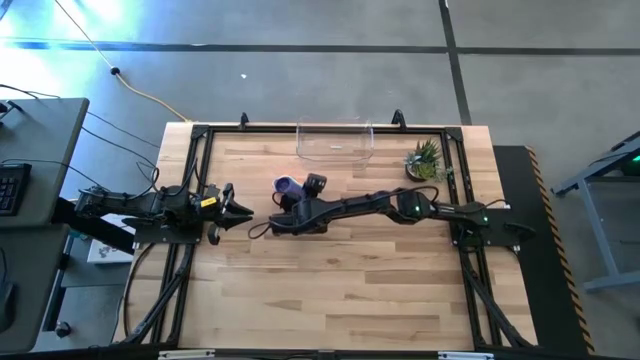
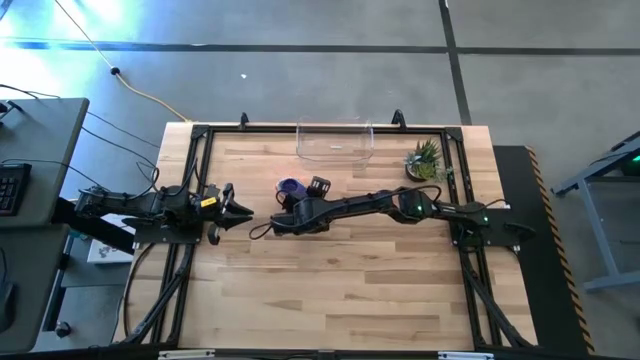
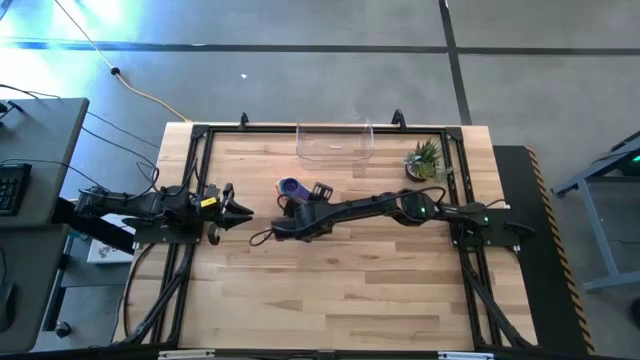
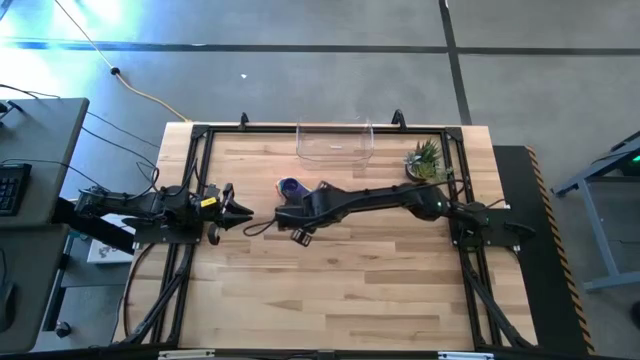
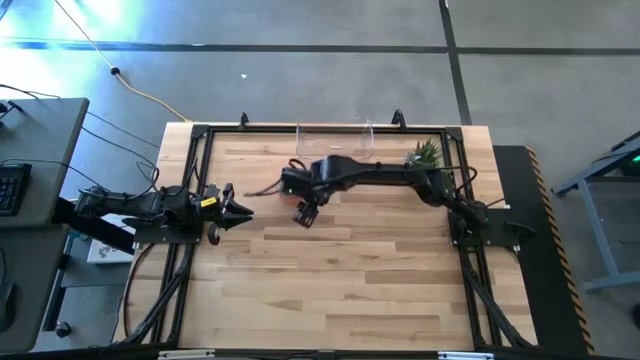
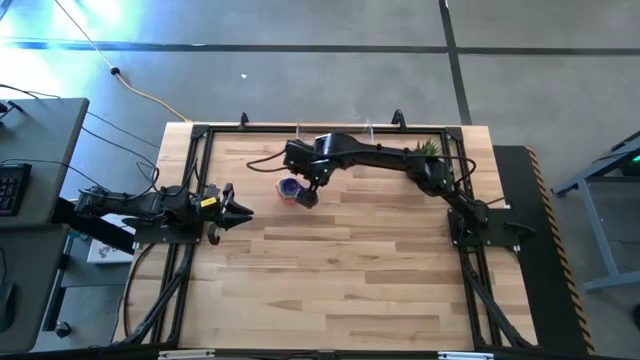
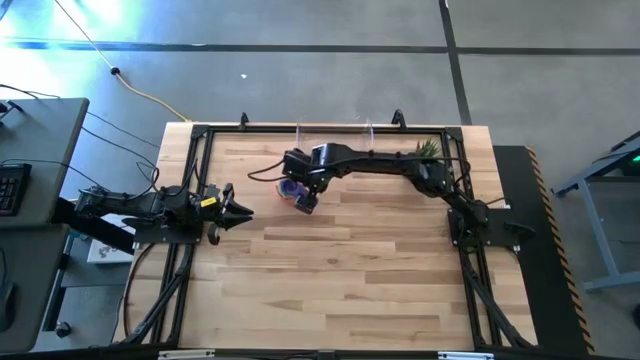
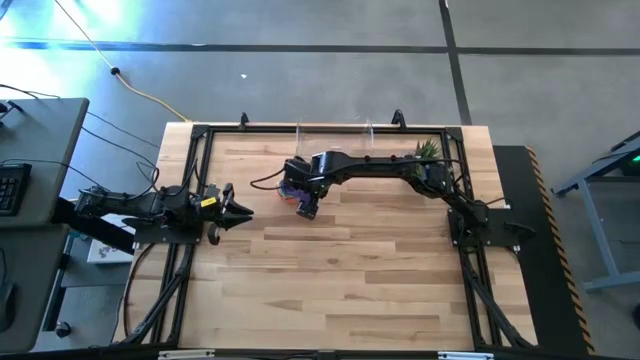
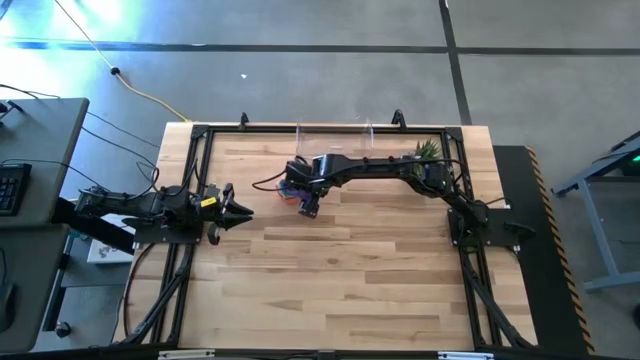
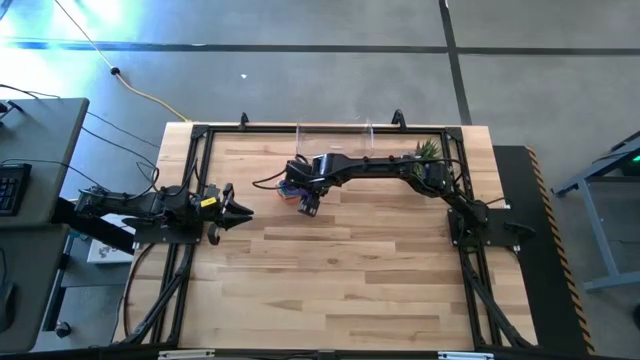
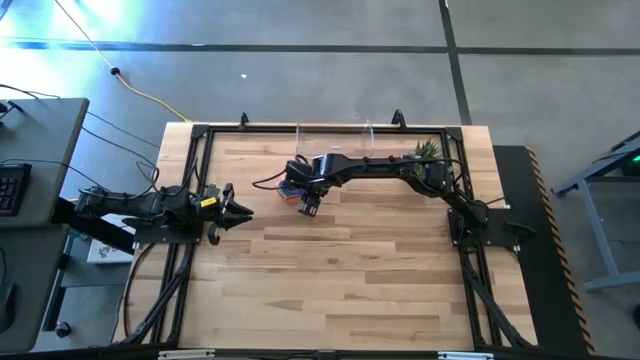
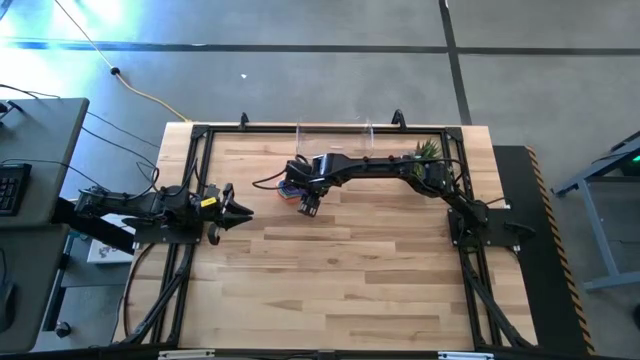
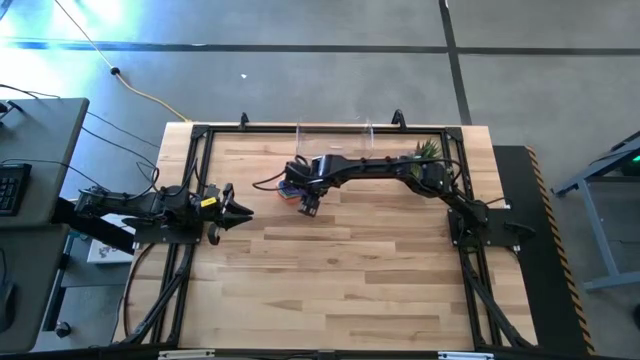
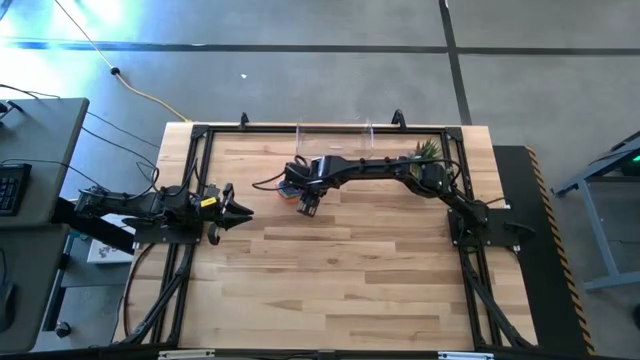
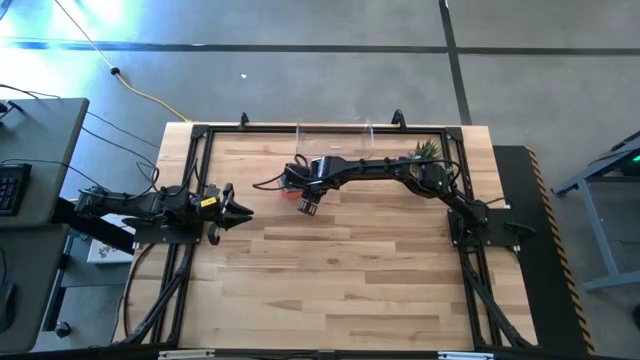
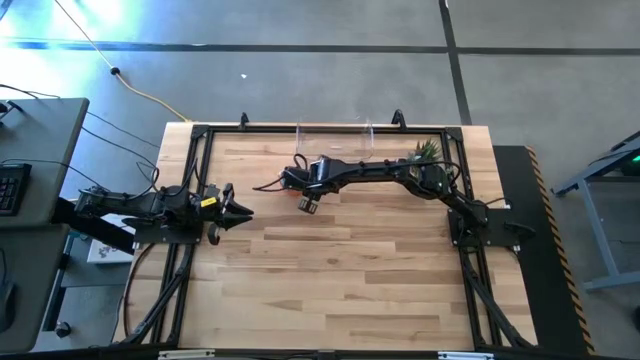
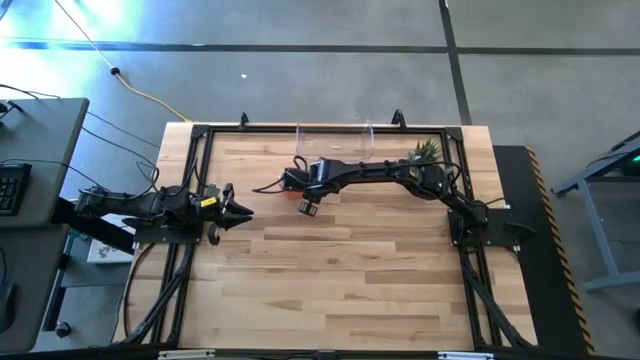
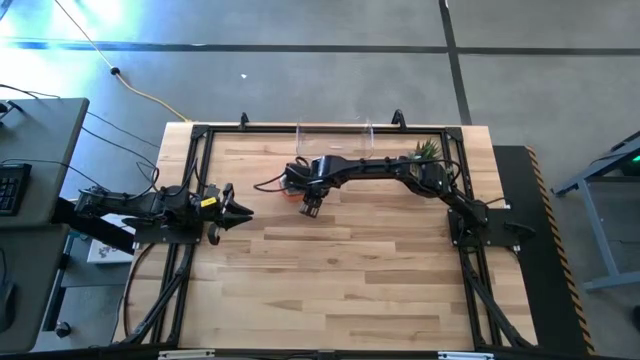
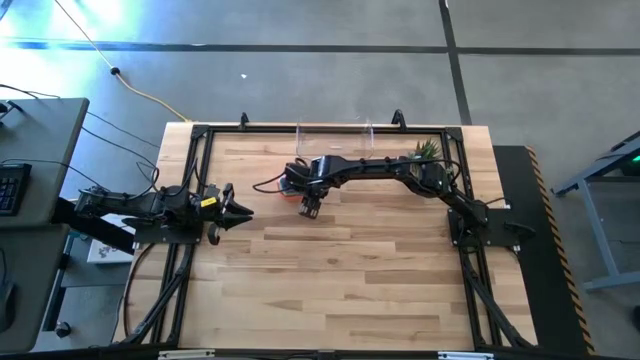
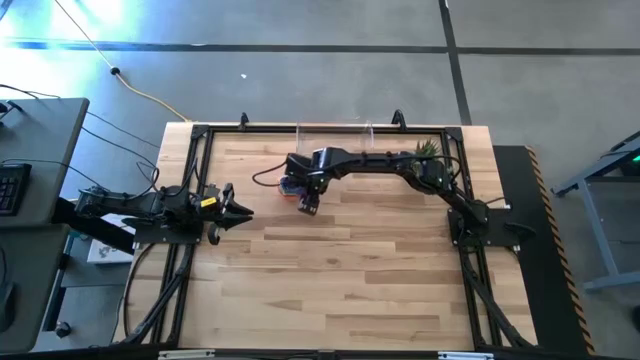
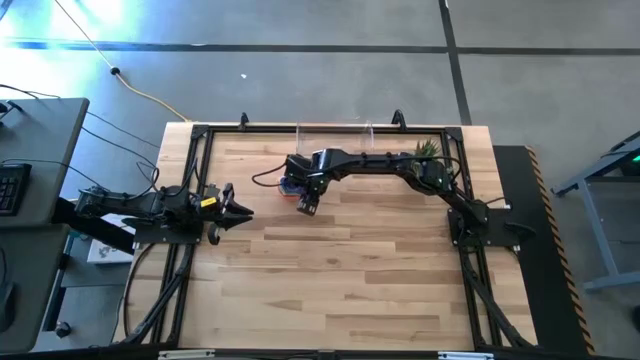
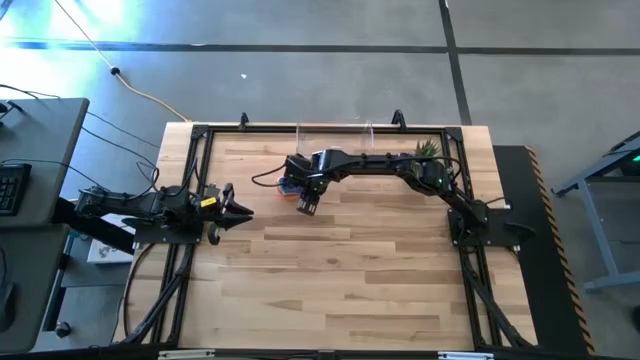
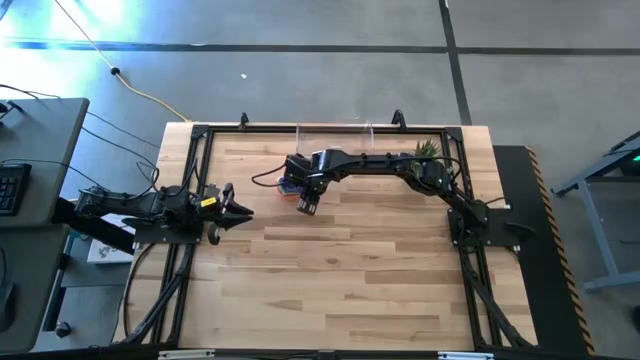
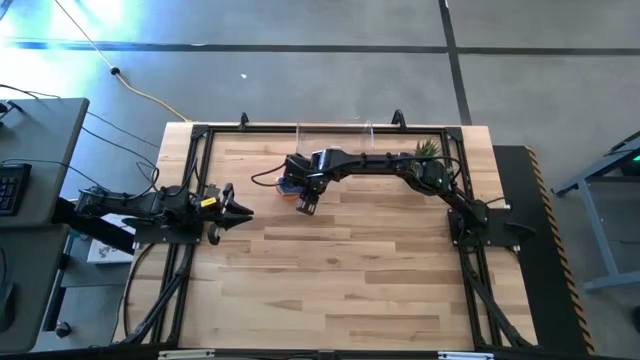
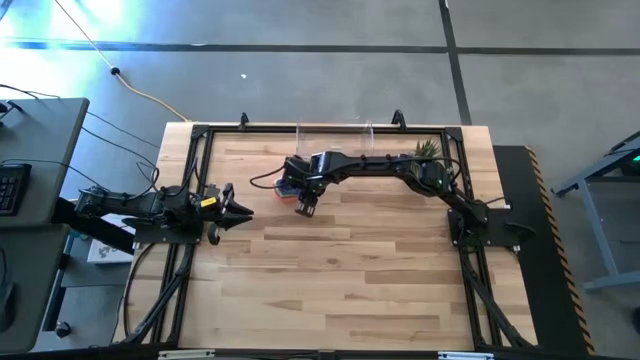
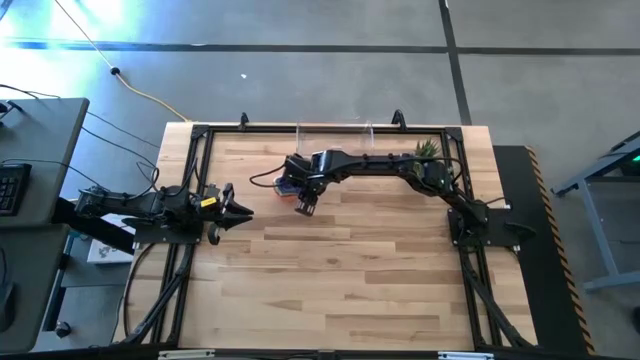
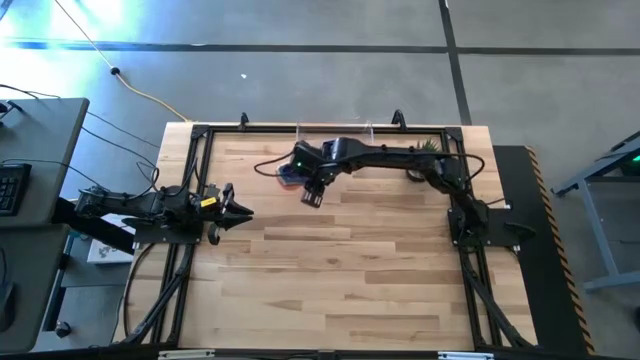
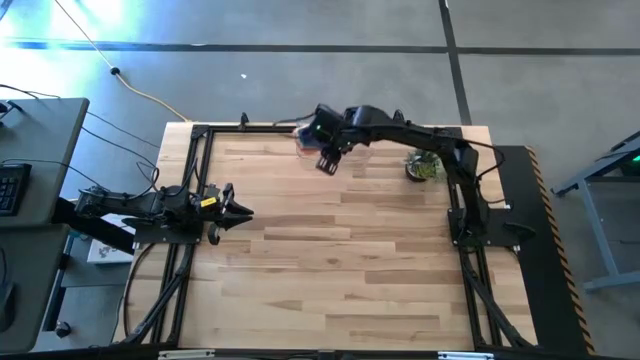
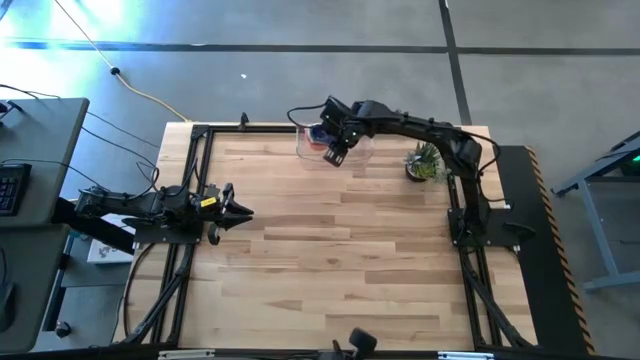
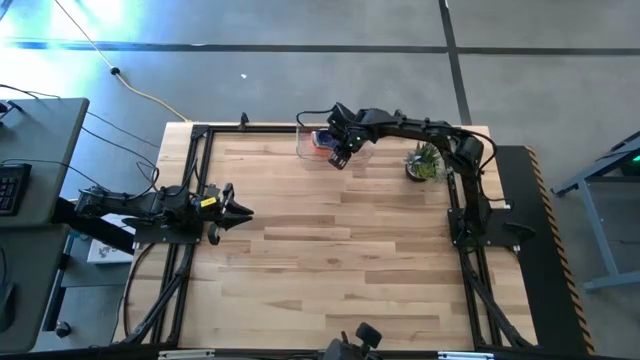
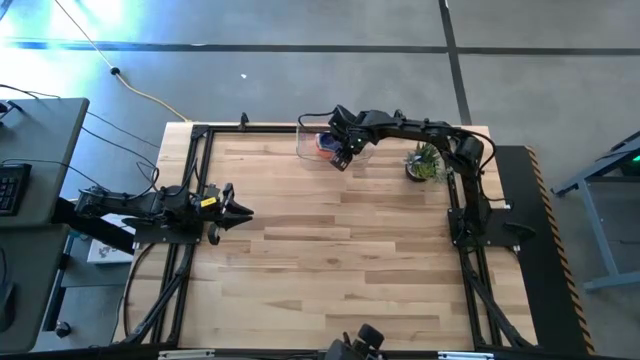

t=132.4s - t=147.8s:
Task: Nest measuring cups in basket
Put the nest of measuring cups into the transparent bin

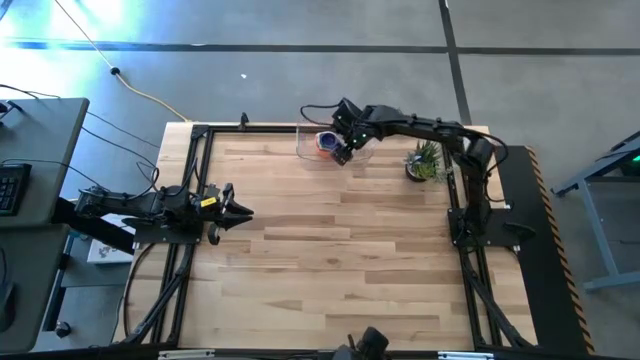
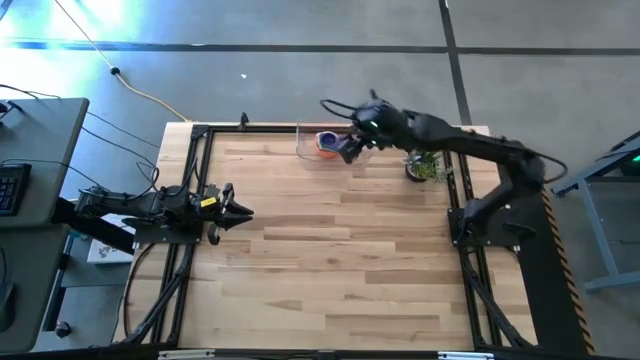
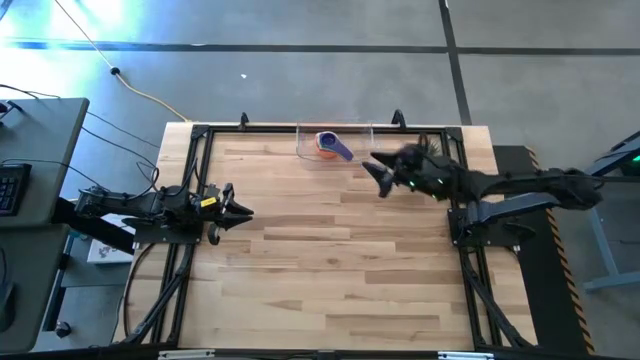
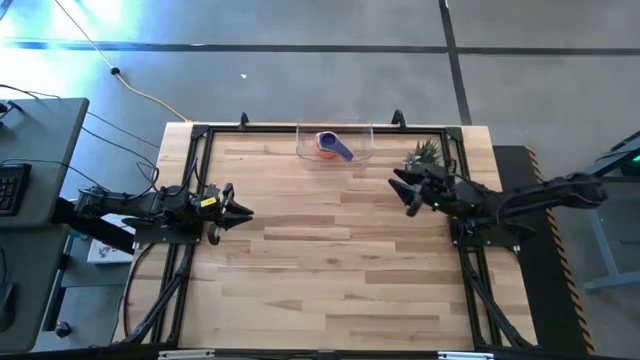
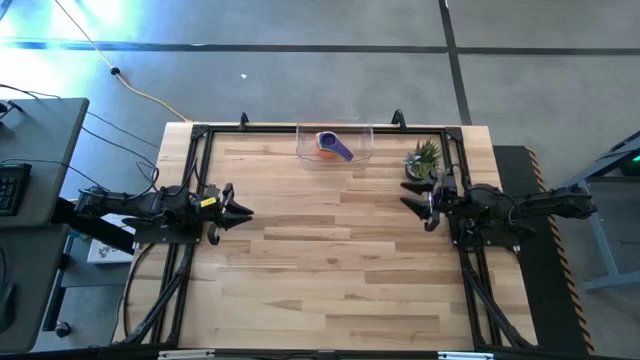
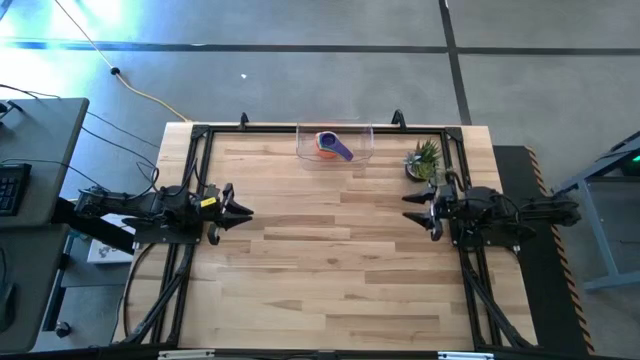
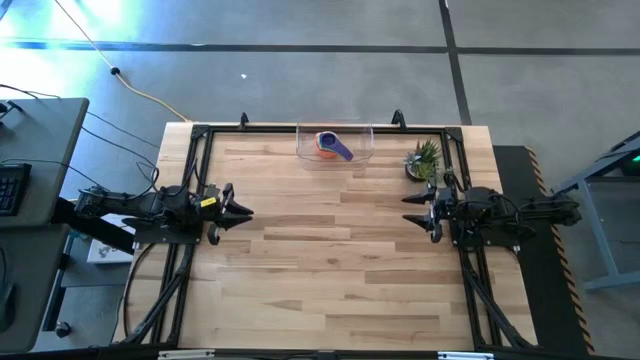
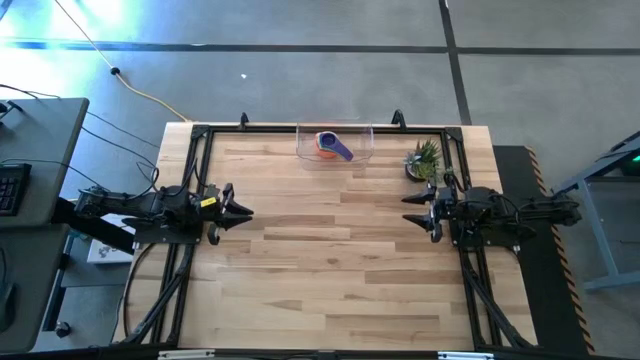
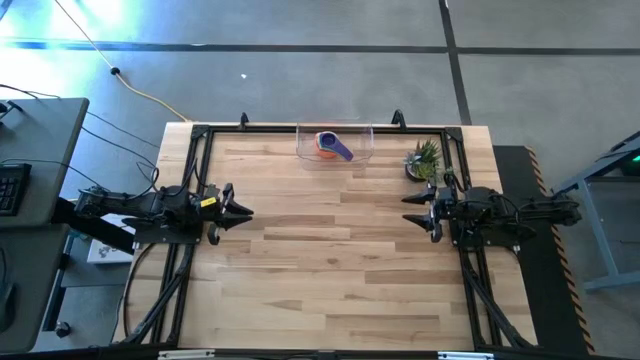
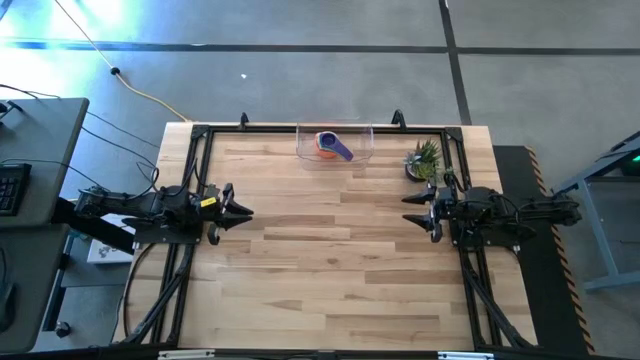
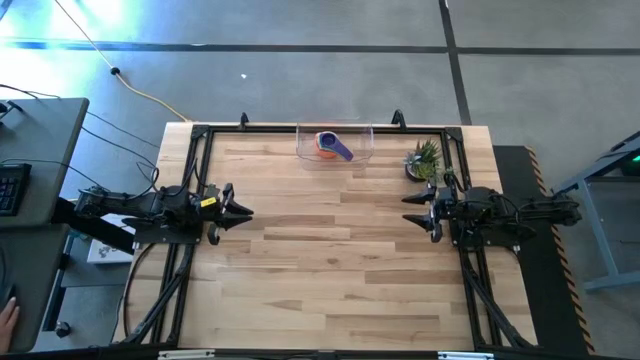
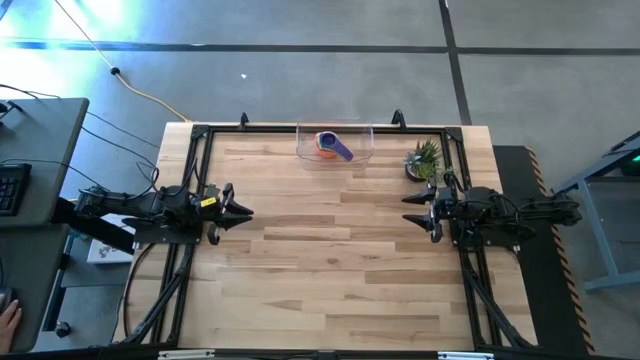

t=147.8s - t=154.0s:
Return to Home Position
